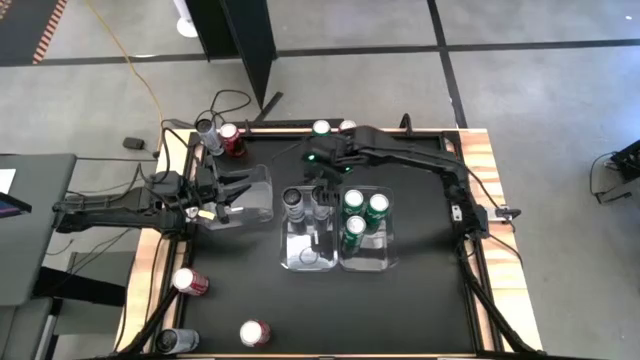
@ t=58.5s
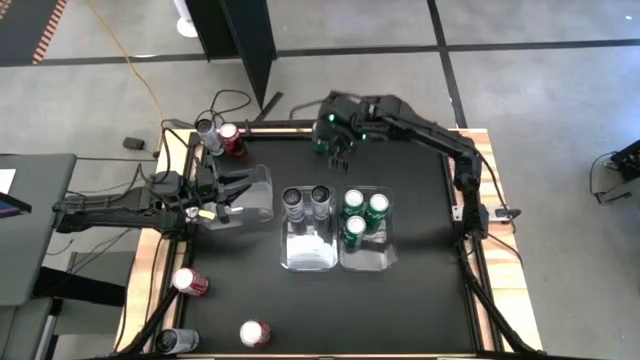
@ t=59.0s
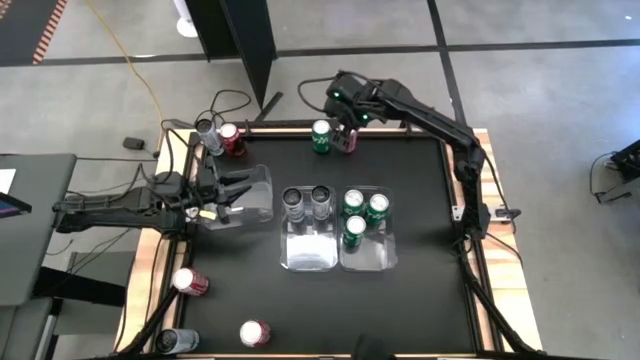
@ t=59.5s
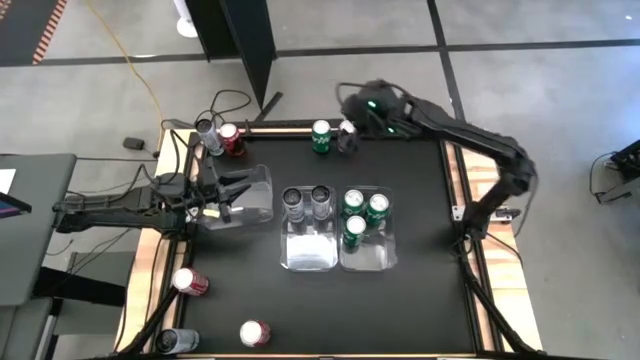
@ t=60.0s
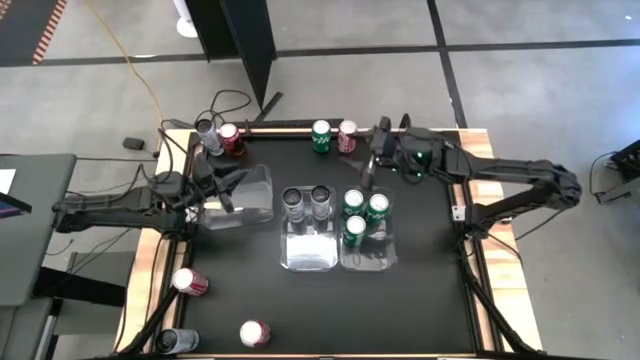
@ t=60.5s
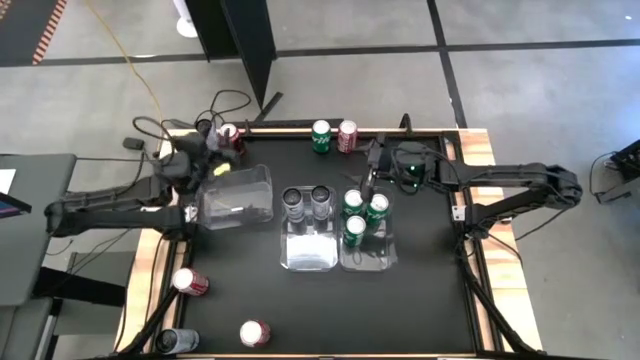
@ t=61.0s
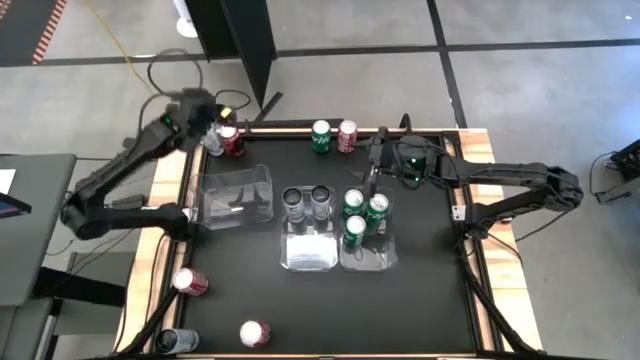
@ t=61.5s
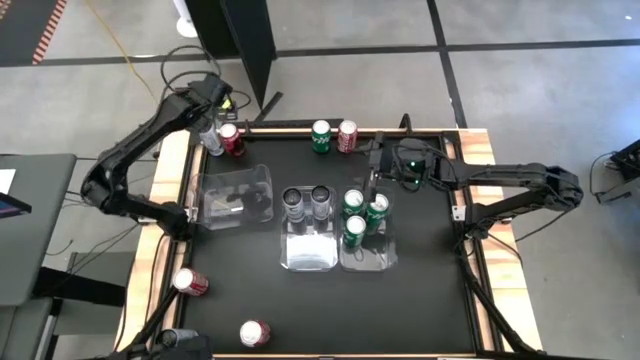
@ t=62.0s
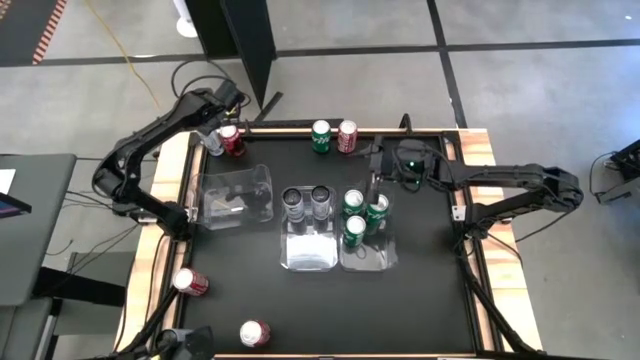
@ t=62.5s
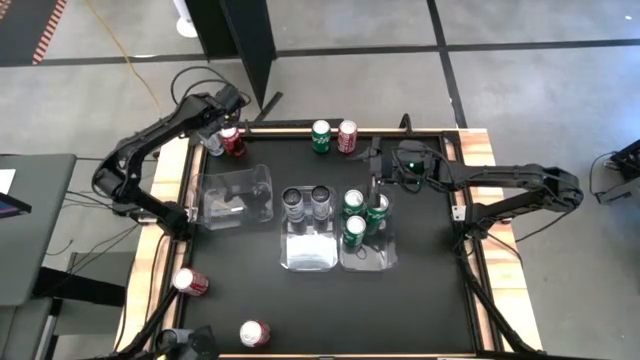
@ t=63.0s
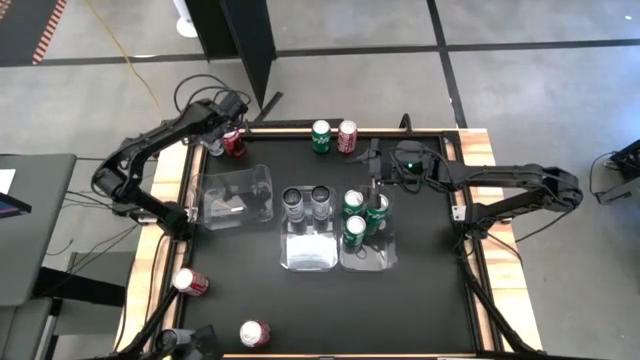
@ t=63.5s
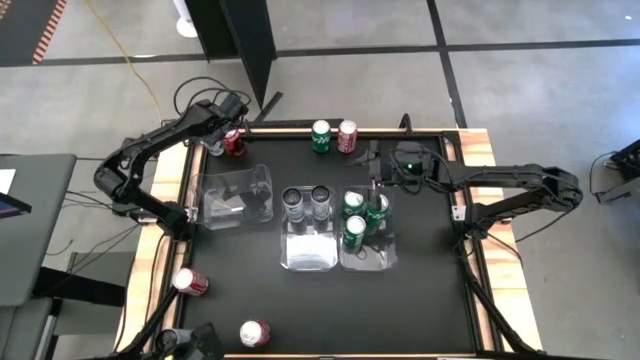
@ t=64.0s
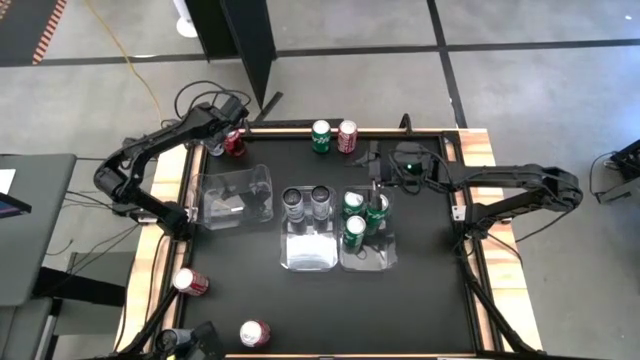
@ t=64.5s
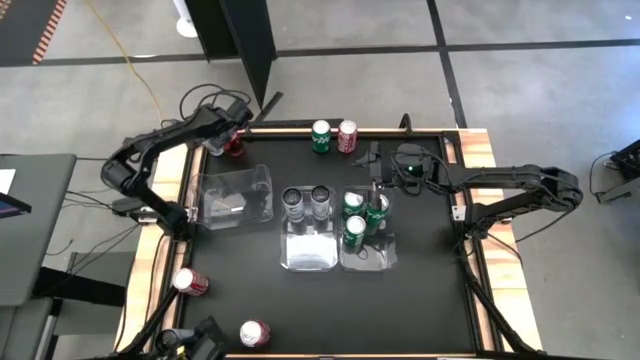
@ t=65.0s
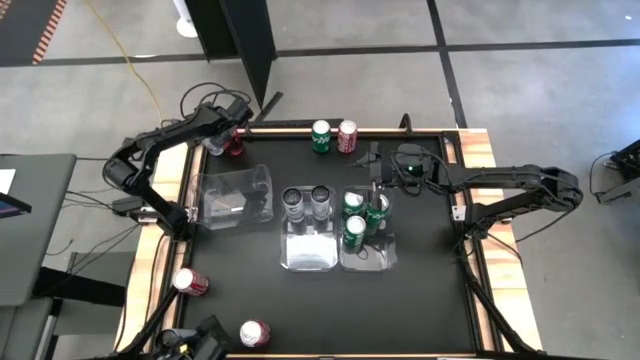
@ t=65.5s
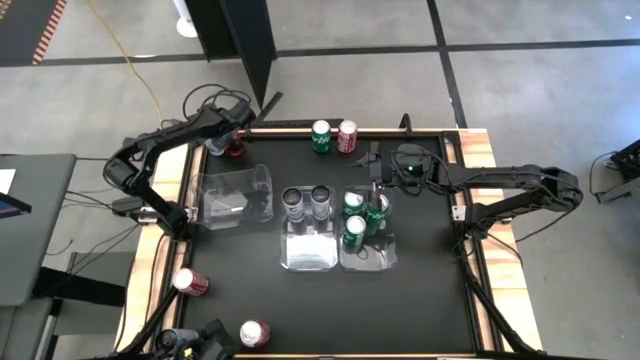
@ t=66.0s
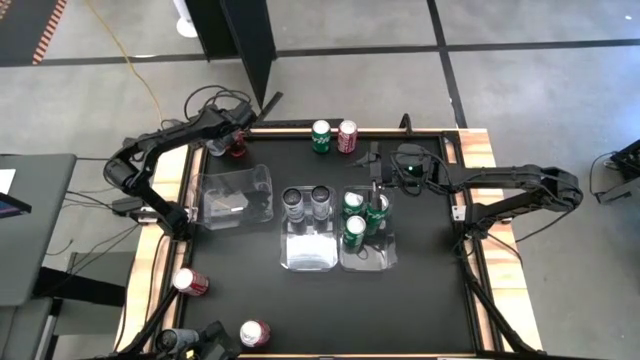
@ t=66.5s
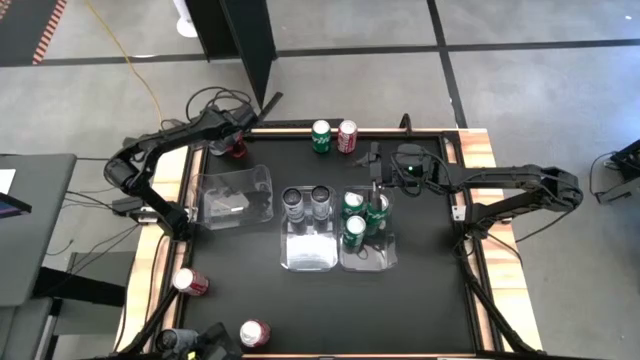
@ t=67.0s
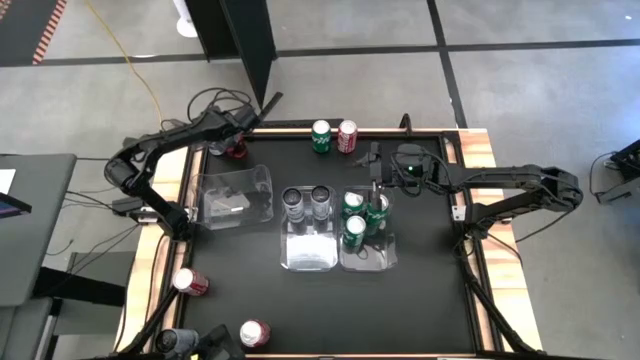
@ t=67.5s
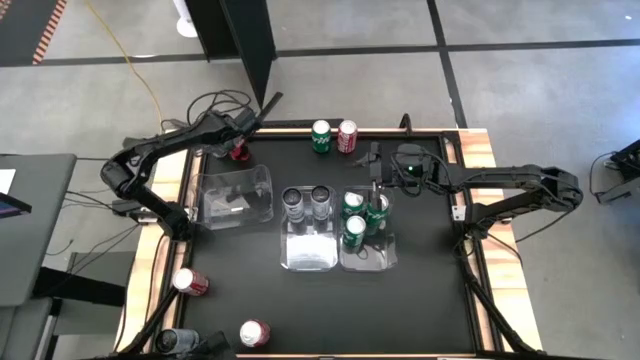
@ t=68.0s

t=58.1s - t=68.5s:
Task: Sort soda cans
Put the top white and blue soda can into the center transparent bin

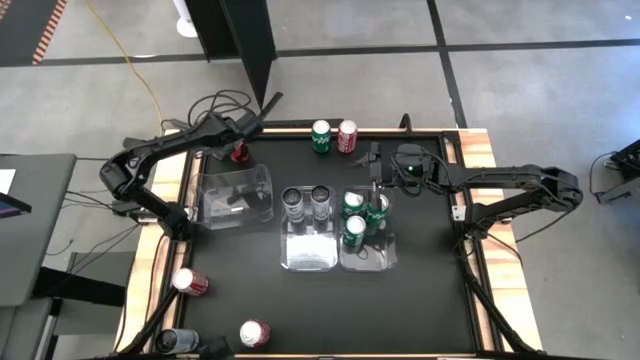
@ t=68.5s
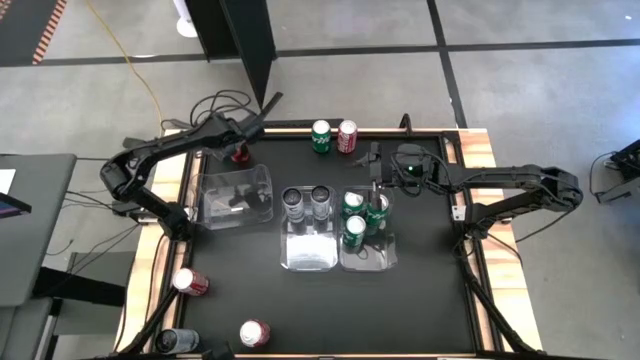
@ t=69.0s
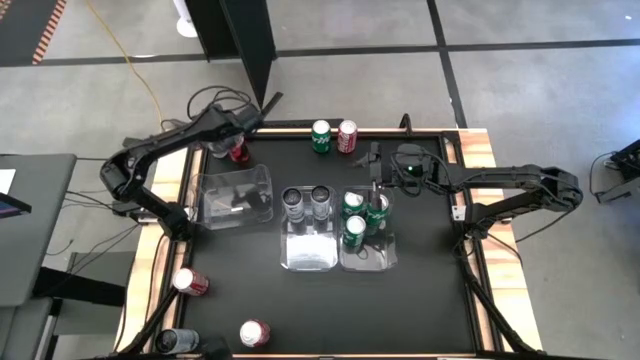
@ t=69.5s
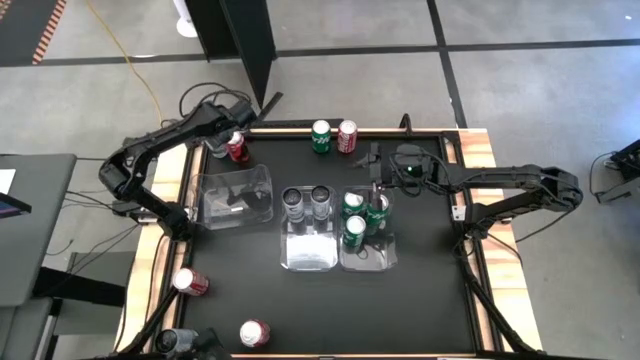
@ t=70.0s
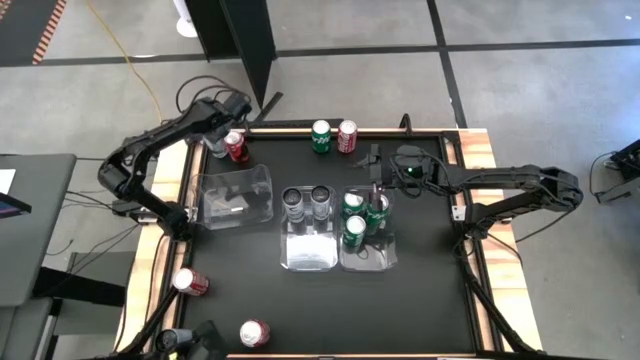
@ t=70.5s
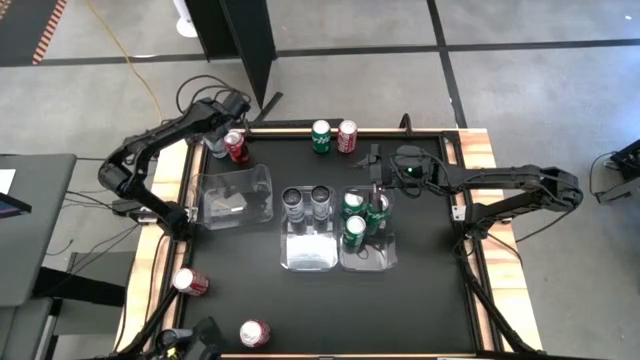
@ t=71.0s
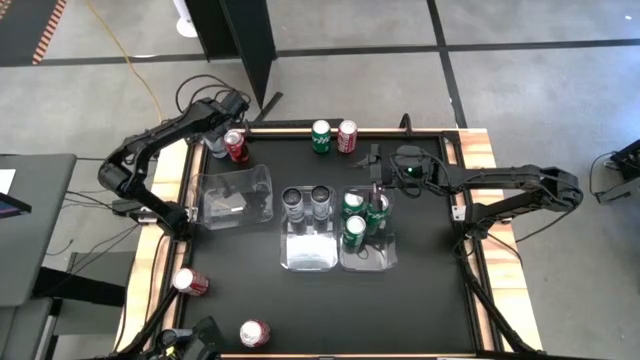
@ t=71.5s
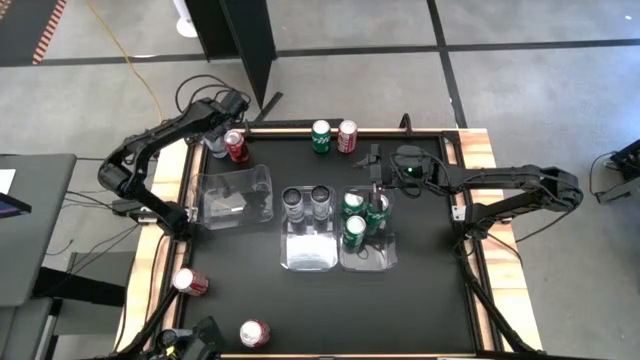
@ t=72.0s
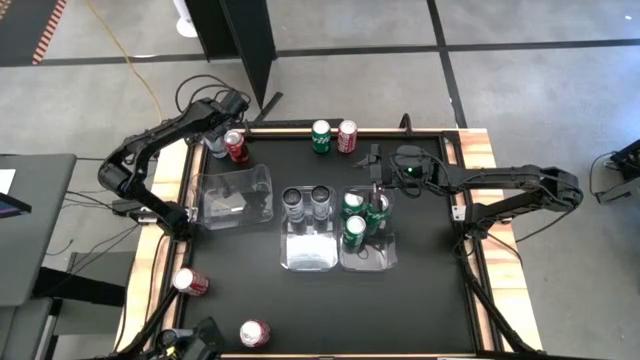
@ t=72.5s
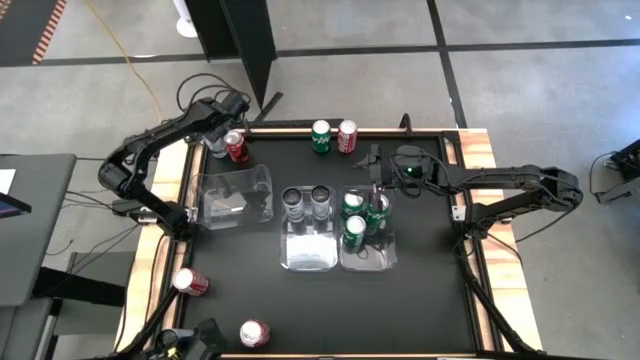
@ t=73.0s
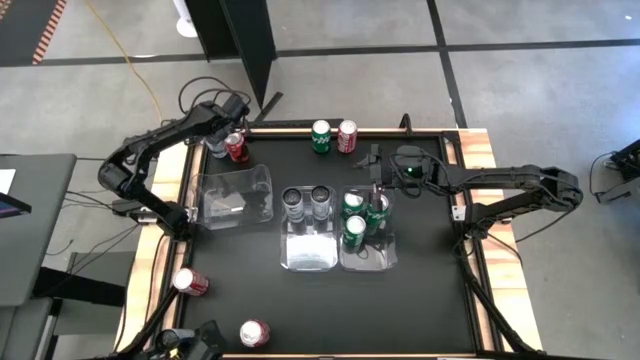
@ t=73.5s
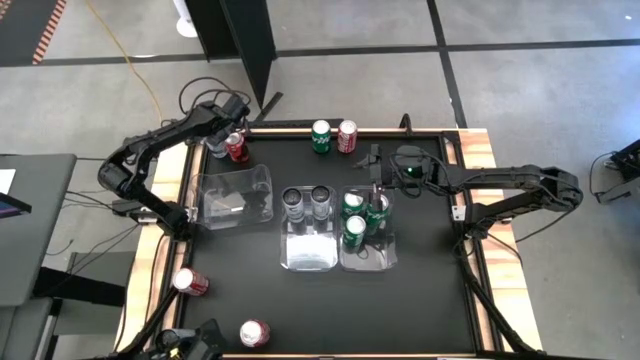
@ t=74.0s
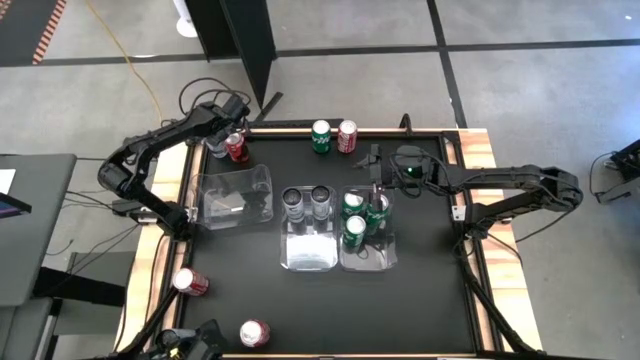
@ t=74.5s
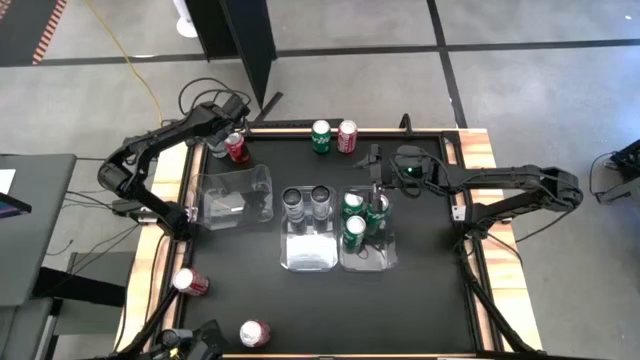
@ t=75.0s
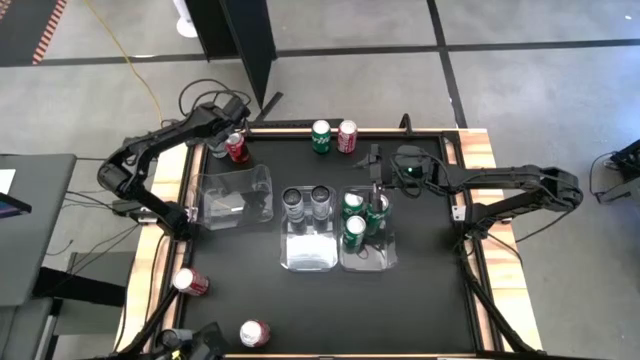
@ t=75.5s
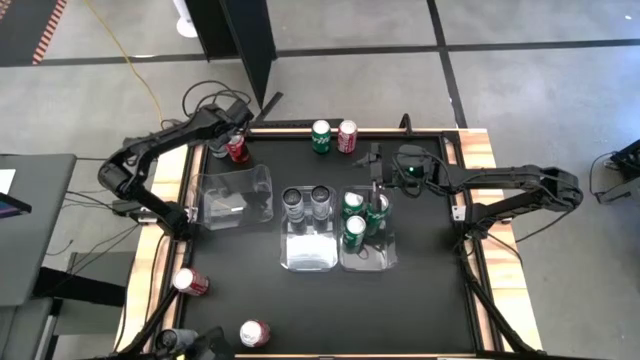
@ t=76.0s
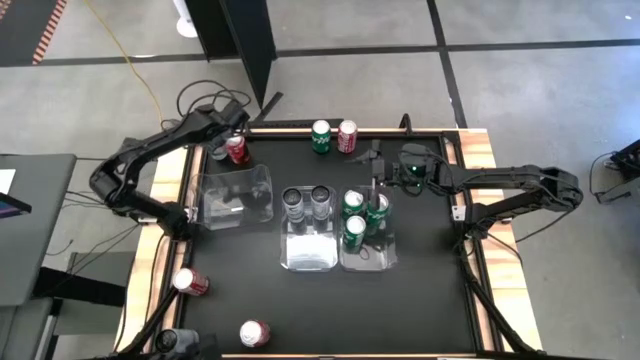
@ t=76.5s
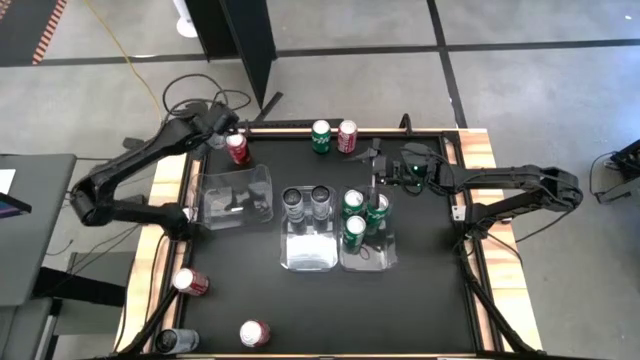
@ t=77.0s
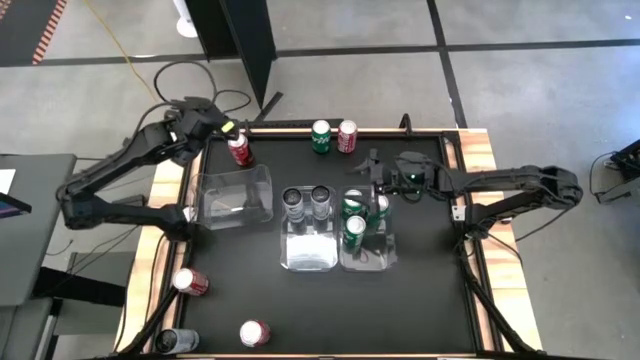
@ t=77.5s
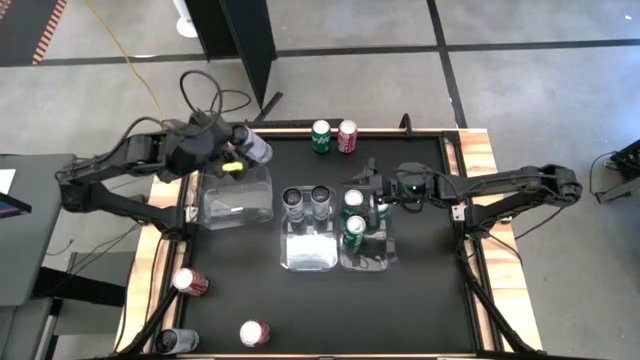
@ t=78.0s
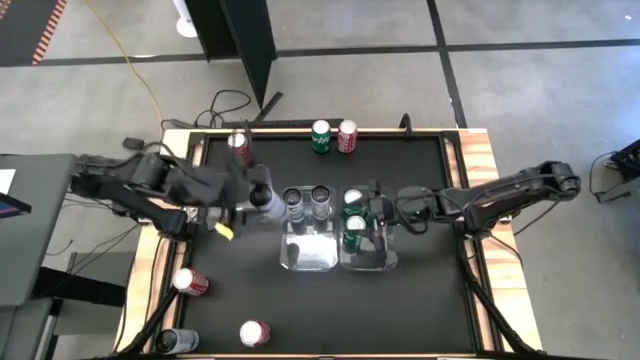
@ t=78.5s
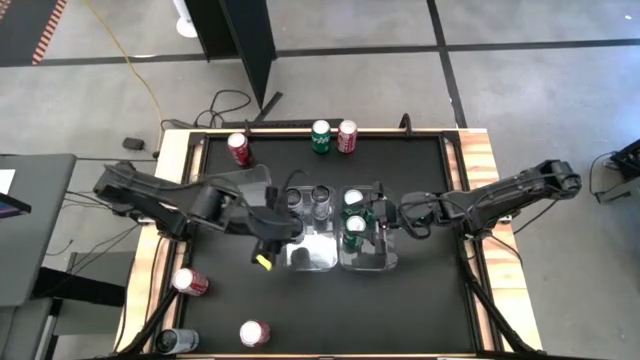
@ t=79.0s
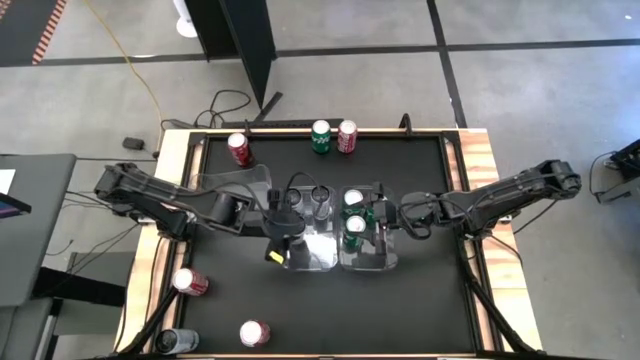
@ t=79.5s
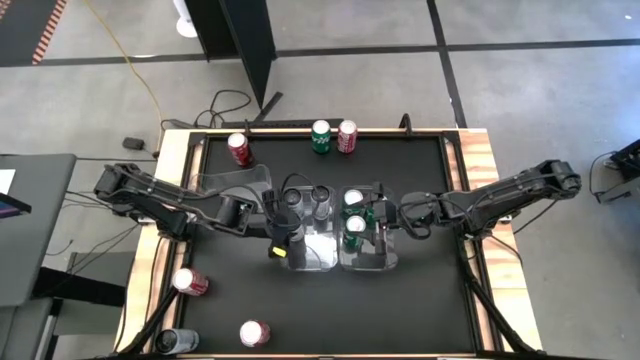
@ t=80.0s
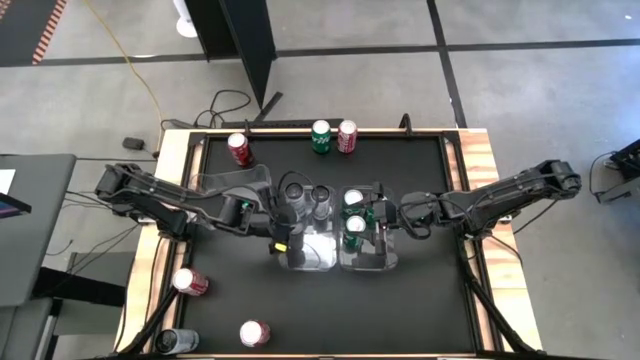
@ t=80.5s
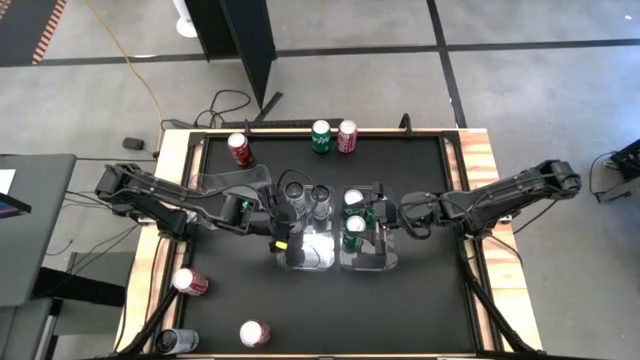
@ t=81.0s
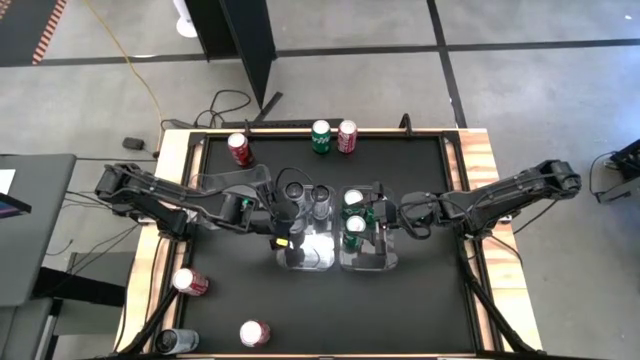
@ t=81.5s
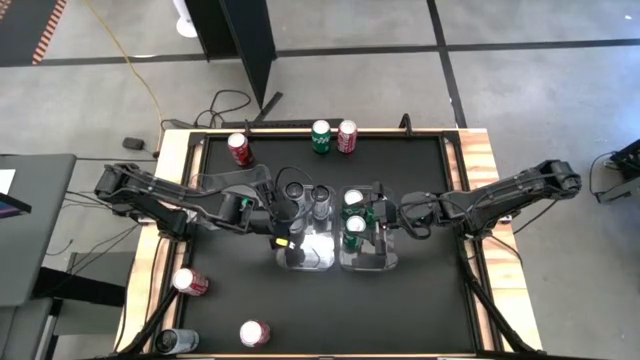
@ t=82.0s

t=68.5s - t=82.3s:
Put the top white and blue soda can into the center transparent bin
